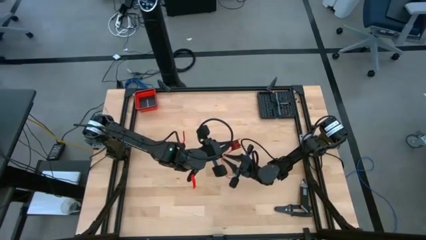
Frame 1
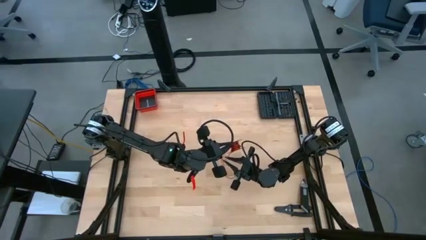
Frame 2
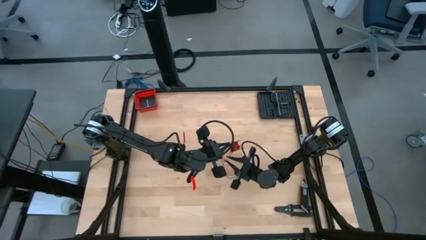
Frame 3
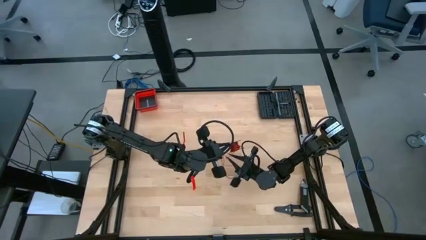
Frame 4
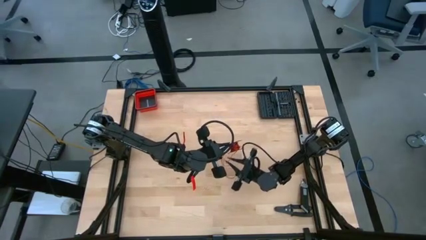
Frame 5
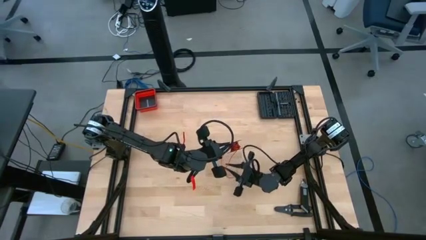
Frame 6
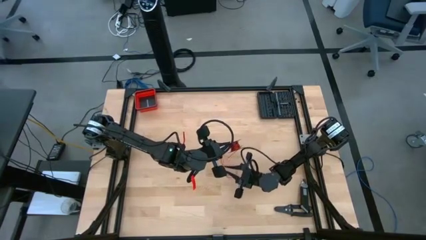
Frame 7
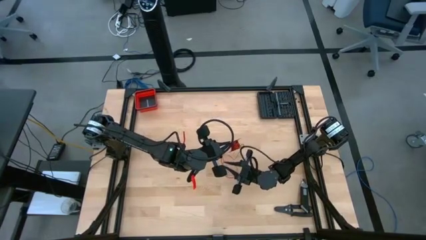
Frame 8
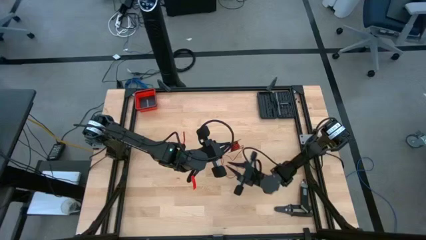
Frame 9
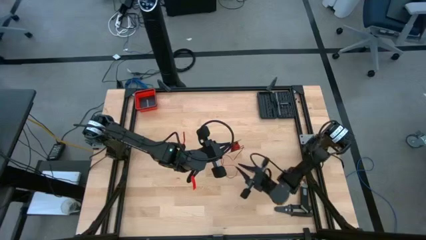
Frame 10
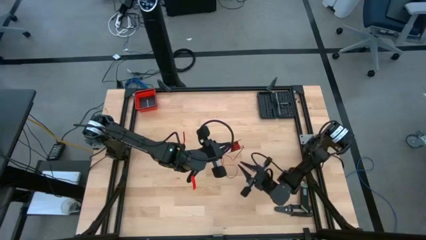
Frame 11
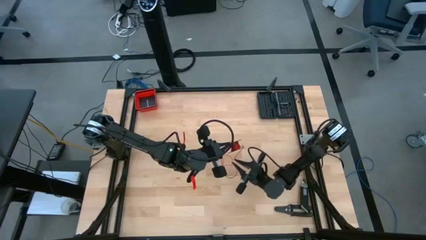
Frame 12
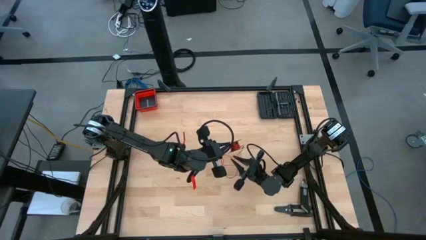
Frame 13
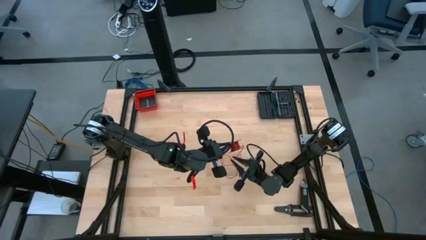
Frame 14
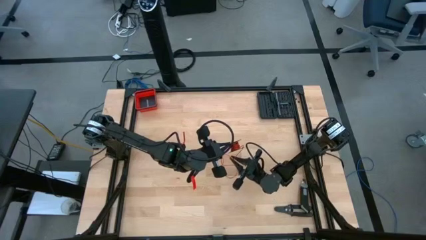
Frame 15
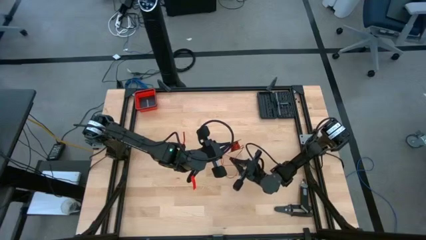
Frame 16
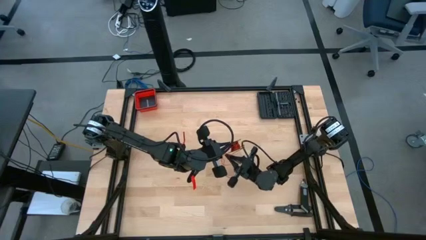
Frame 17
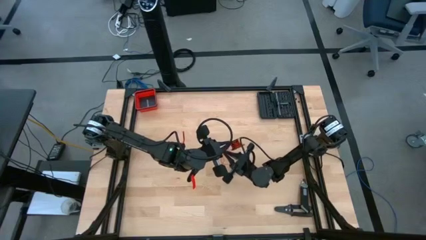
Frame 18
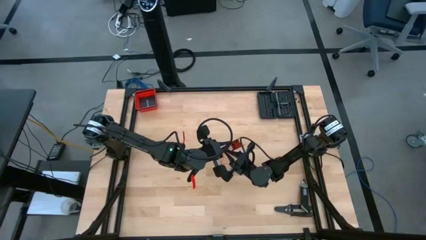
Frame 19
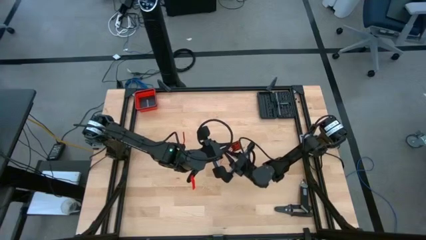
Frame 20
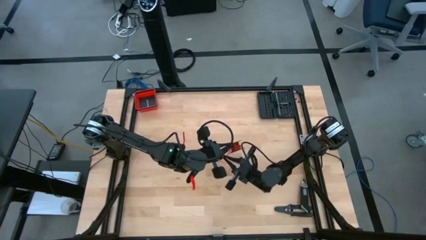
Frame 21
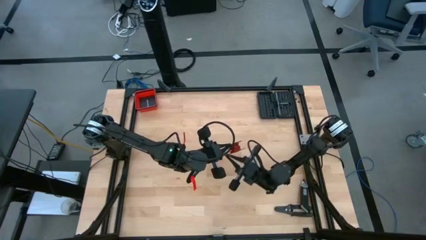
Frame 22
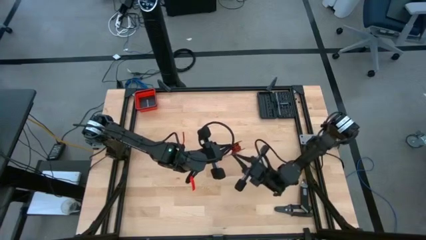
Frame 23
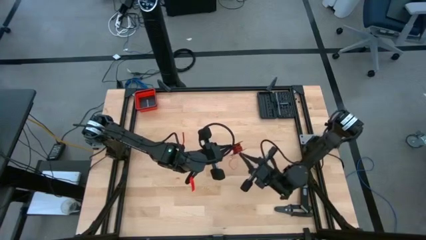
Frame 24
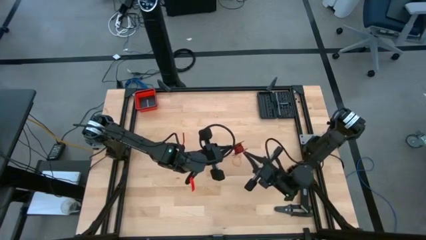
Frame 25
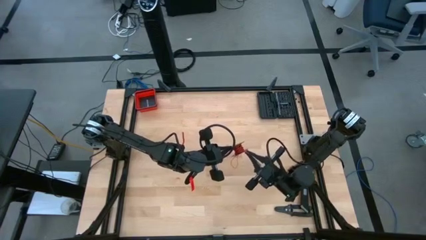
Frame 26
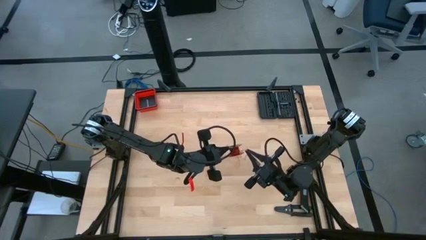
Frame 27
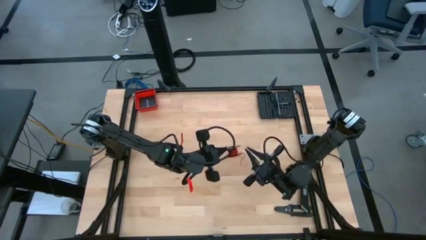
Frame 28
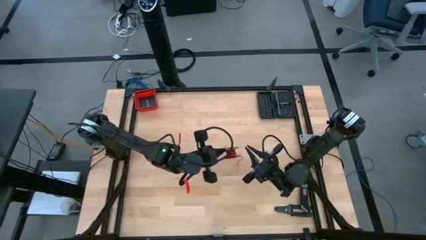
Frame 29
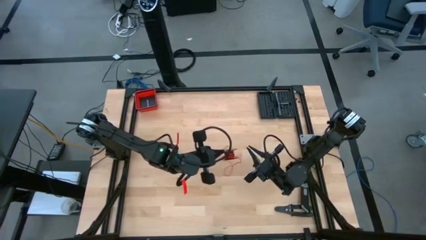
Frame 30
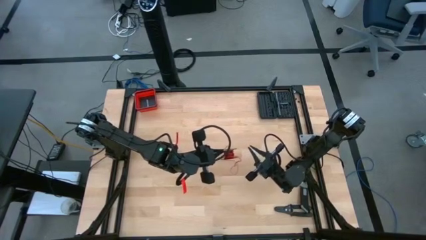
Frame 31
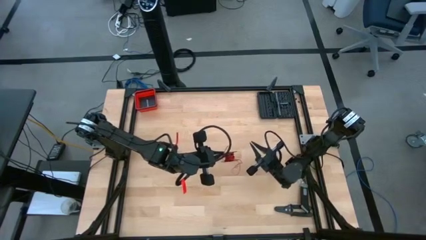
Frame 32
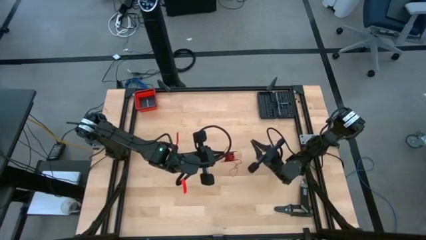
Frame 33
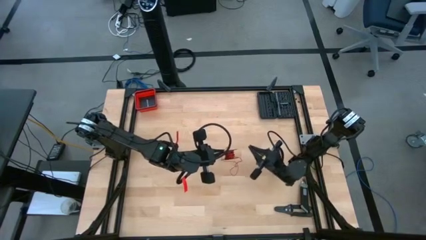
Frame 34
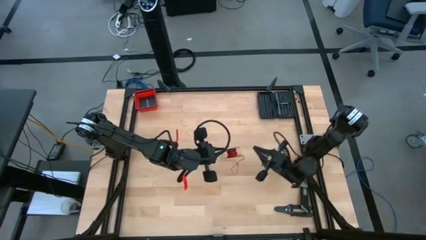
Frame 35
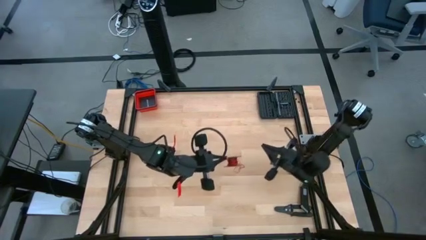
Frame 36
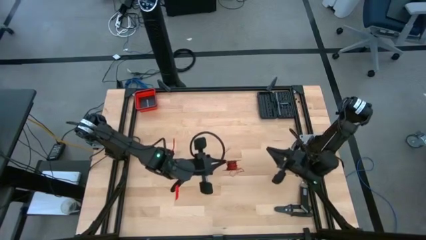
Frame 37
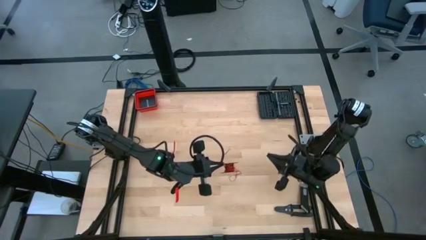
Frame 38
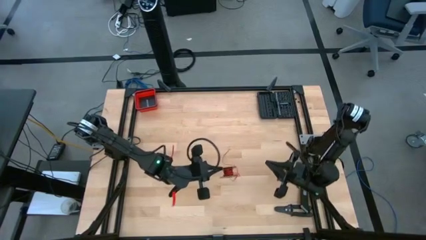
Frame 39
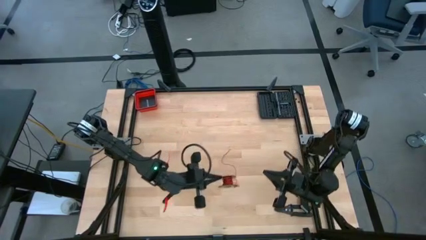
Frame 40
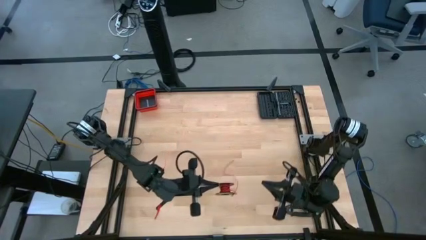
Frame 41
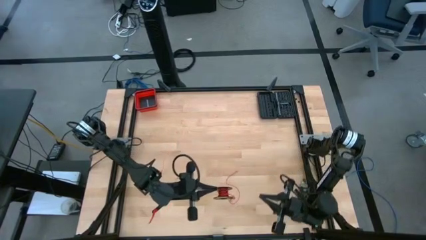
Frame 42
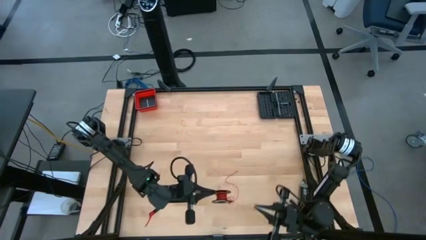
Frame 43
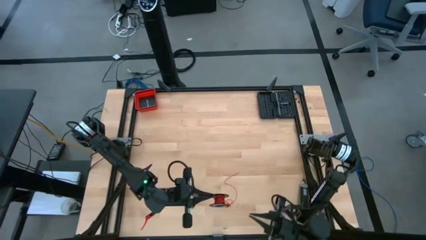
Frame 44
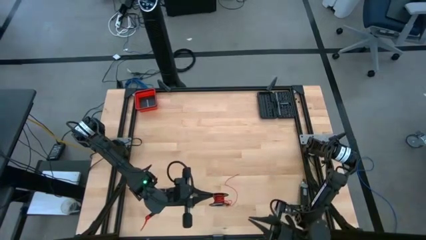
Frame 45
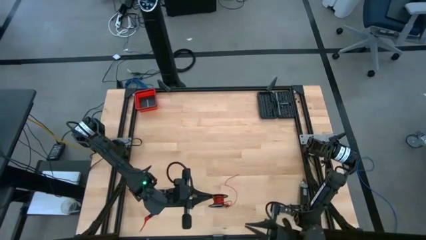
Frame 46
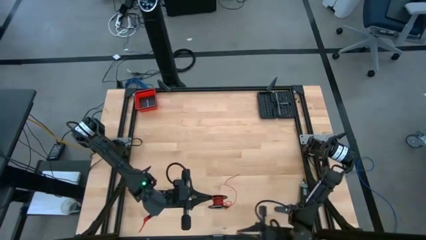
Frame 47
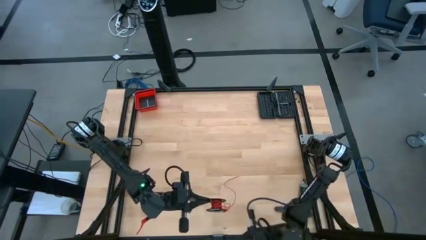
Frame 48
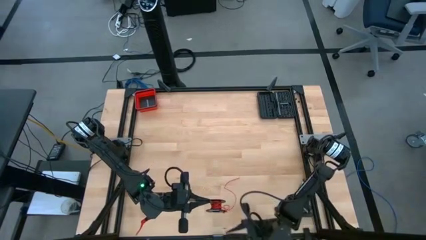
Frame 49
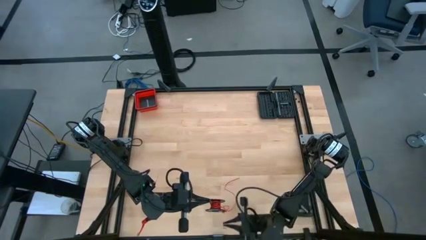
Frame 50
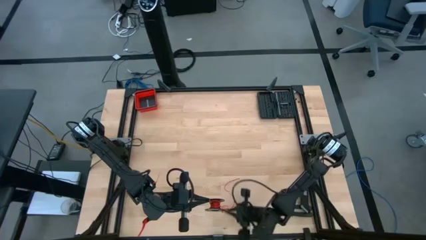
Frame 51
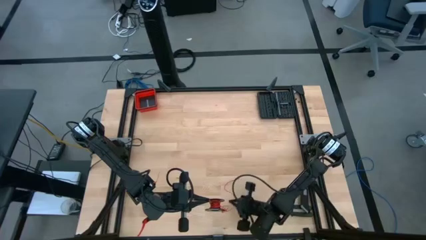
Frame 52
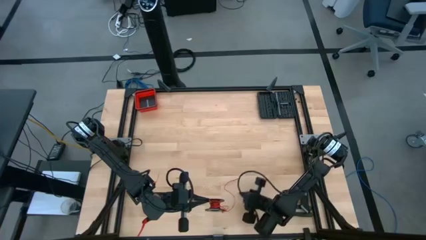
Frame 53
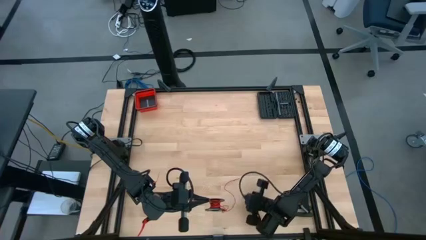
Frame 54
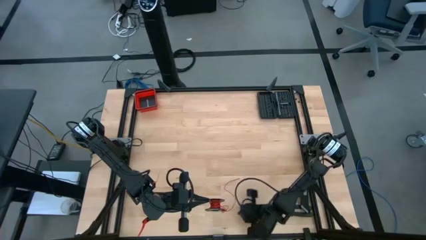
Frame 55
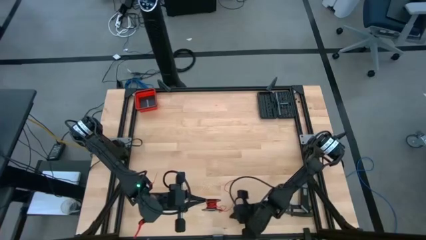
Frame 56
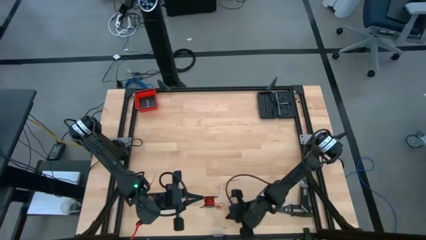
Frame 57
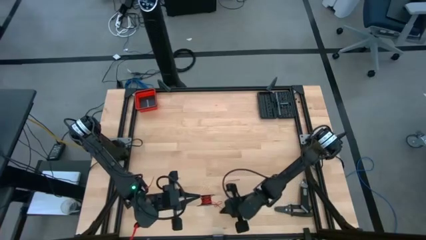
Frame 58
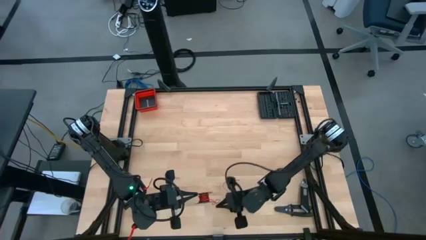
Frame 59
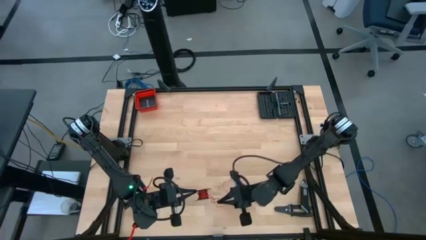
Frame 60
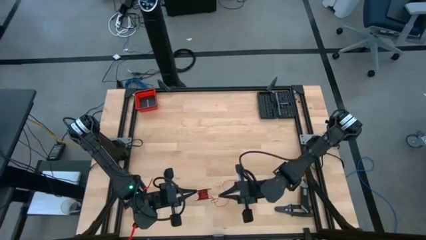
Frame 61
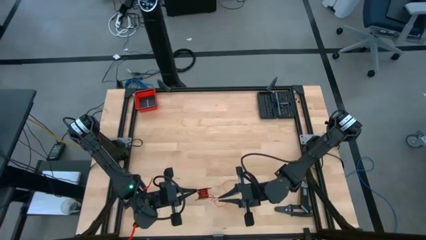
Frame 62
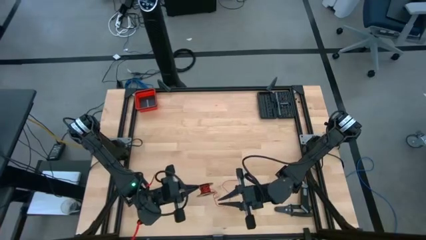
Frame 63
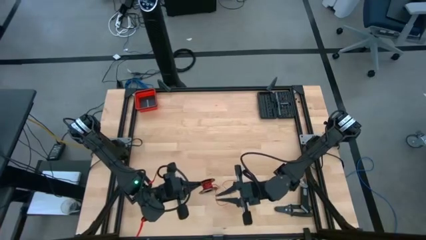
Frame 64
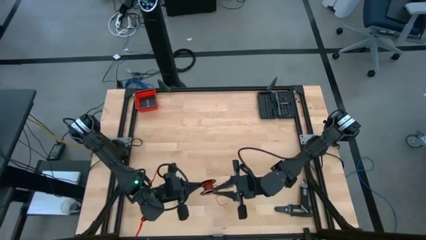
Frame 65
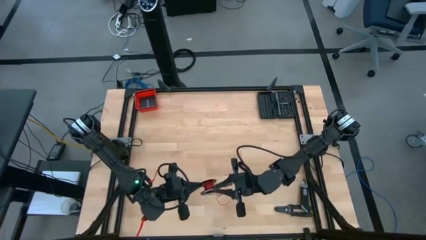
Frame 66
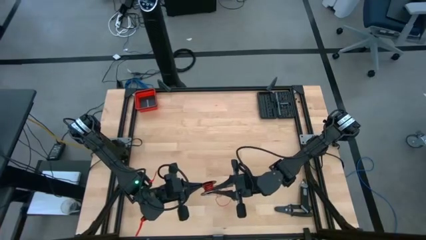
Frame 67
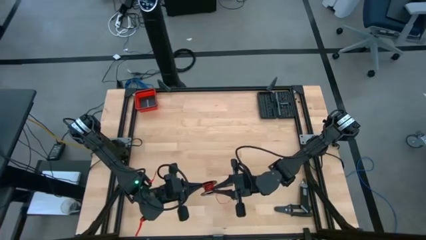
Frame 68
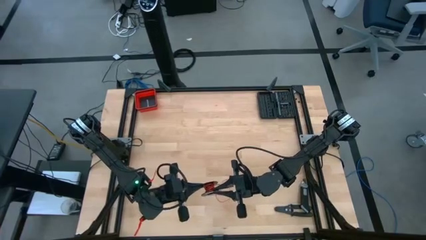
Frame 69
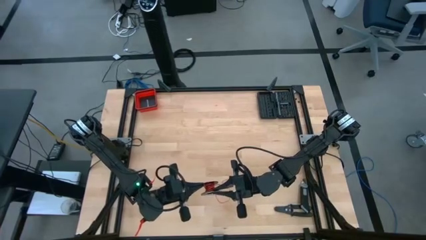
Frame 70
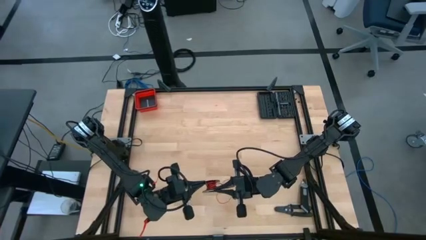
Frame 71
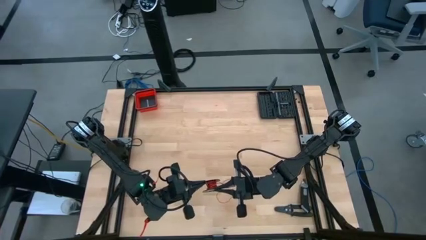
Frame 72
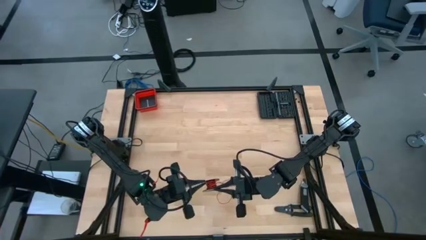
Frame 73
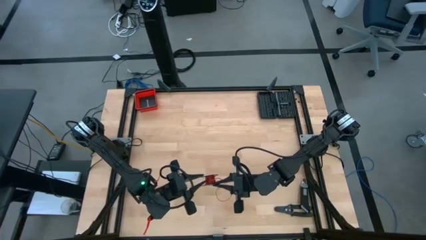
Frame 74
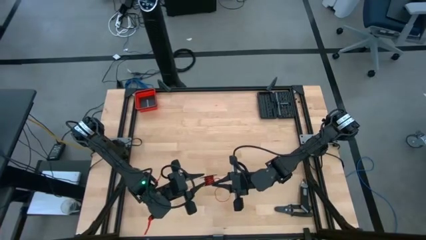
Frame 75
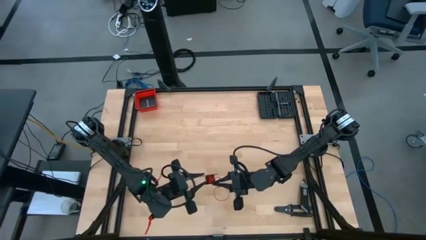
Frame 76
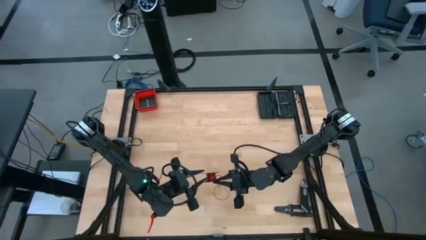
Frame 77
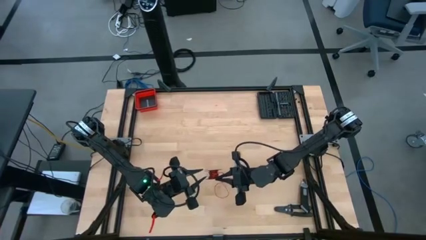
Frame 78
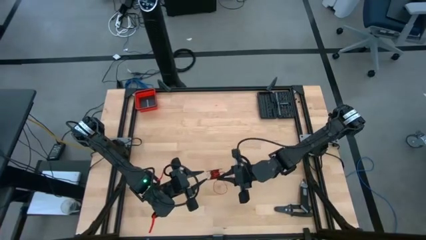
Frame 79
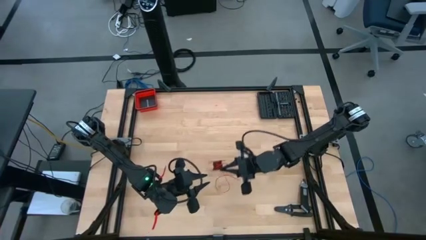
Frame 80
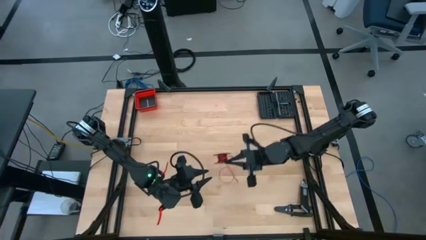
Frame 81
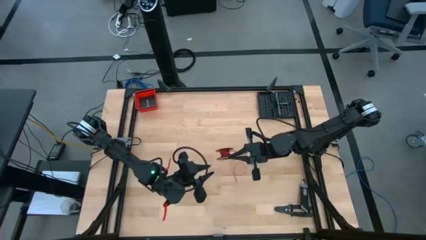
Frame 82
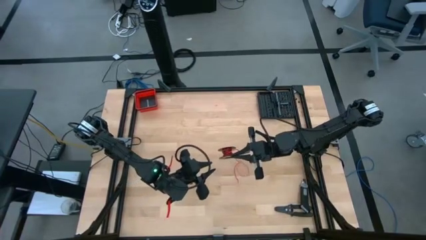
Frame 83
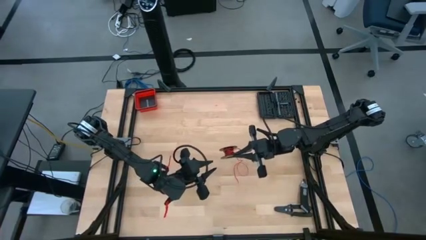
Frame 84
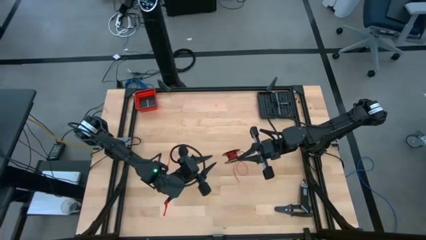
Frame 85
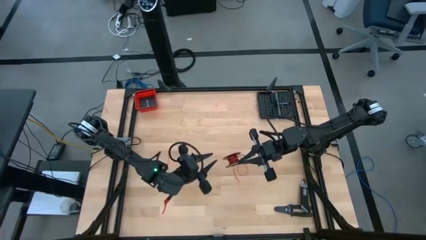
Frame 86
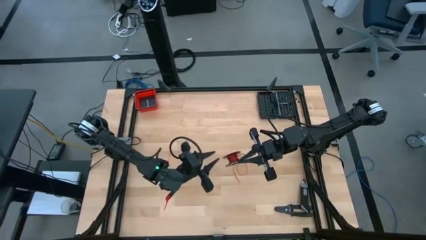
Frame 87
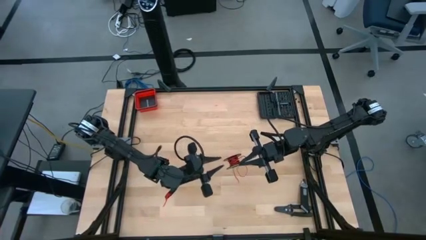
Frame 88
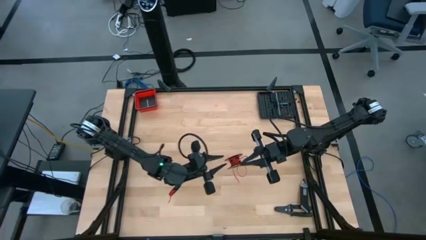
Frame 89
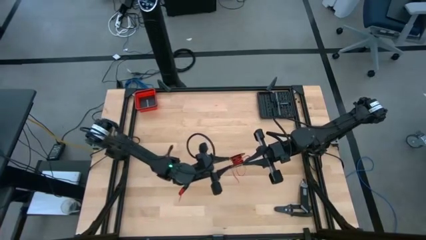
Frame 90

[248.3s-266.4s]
Task: Coil cords
Coil the red wire onto the spool
